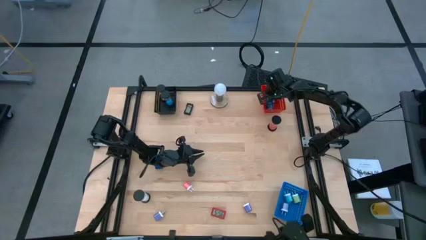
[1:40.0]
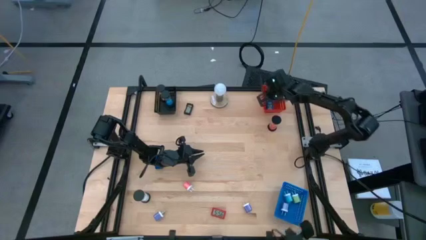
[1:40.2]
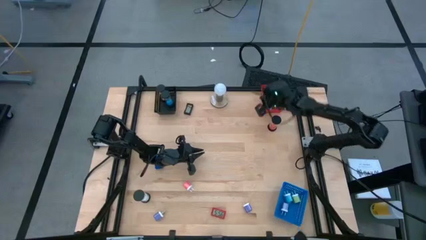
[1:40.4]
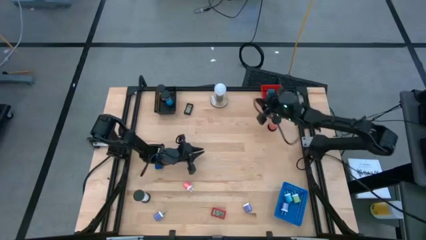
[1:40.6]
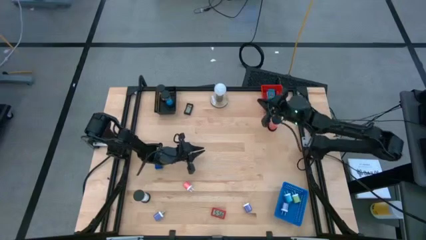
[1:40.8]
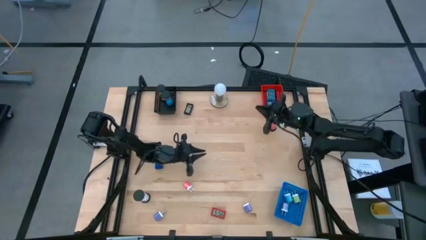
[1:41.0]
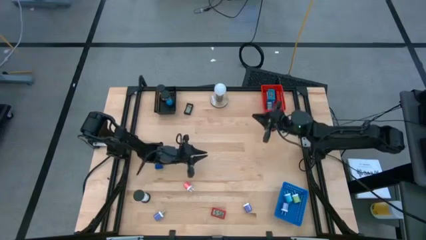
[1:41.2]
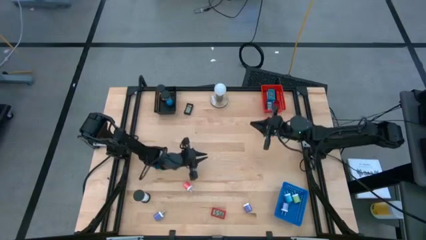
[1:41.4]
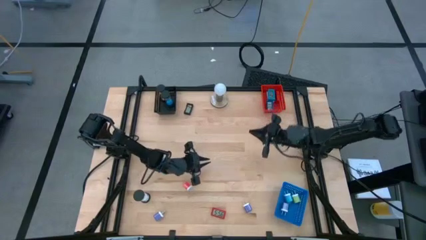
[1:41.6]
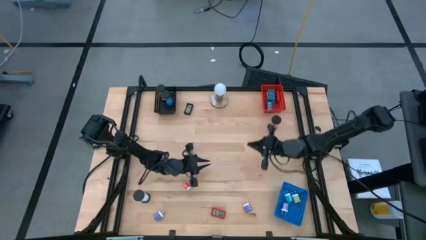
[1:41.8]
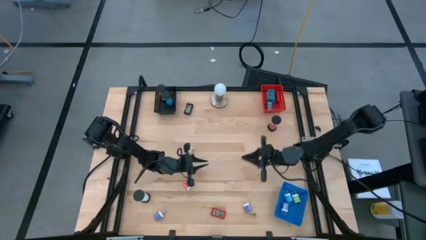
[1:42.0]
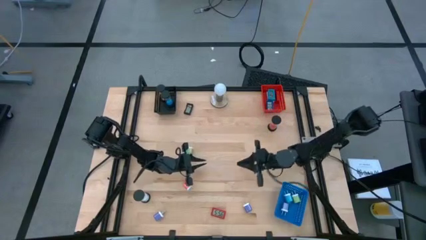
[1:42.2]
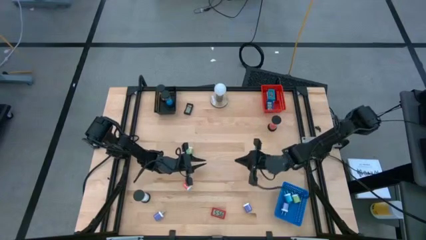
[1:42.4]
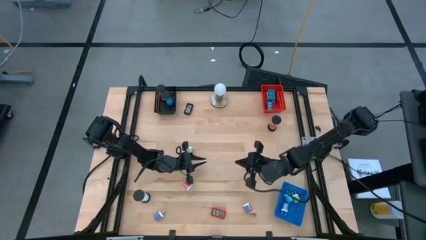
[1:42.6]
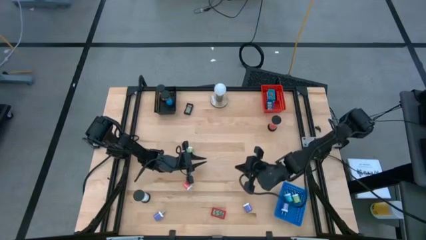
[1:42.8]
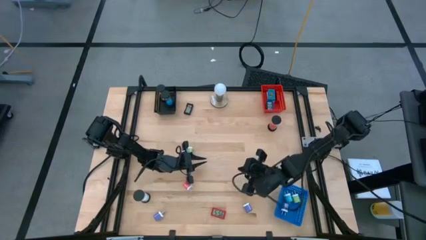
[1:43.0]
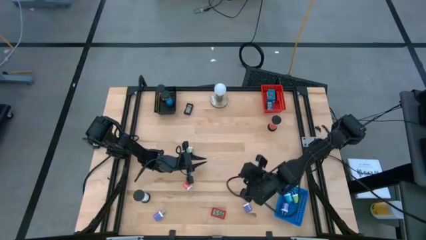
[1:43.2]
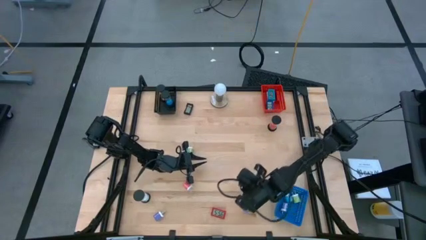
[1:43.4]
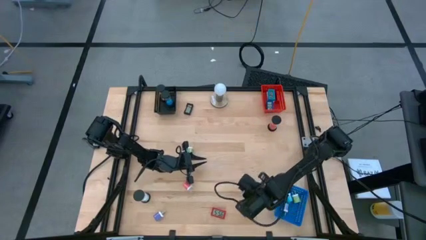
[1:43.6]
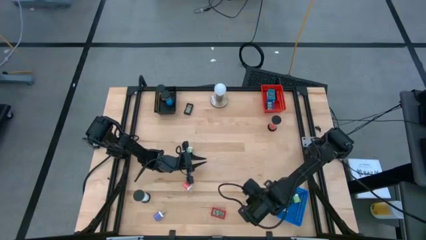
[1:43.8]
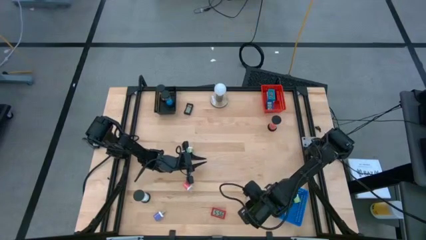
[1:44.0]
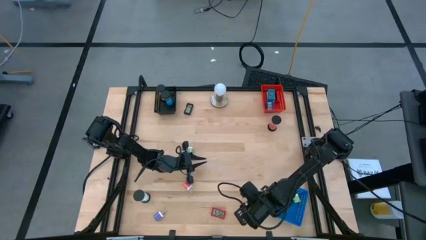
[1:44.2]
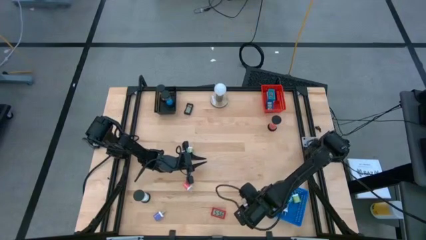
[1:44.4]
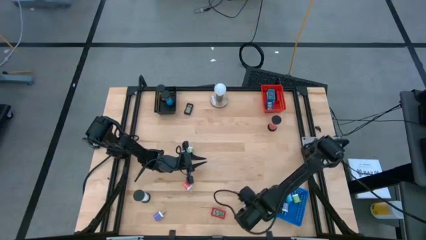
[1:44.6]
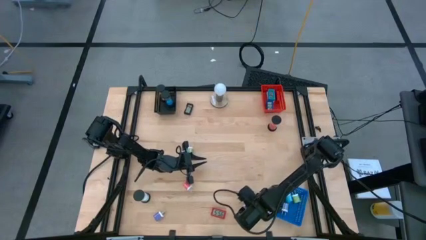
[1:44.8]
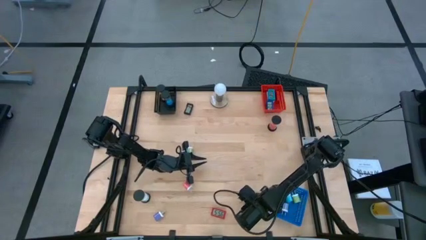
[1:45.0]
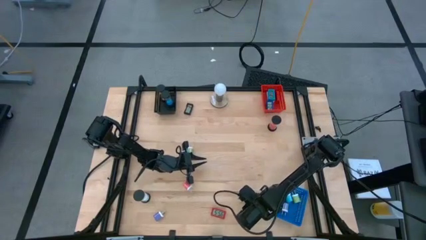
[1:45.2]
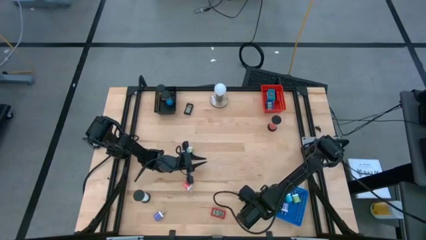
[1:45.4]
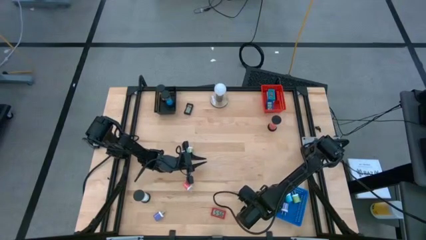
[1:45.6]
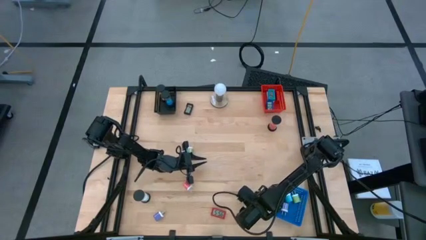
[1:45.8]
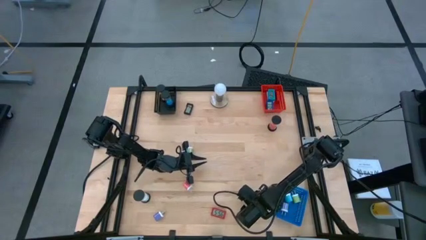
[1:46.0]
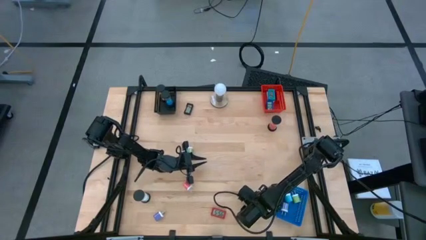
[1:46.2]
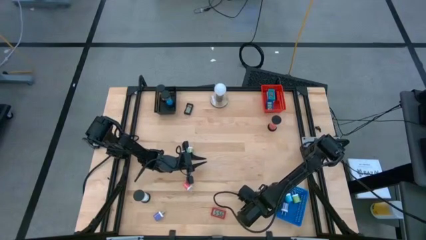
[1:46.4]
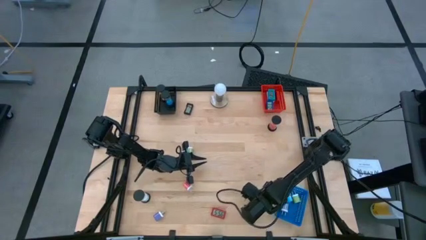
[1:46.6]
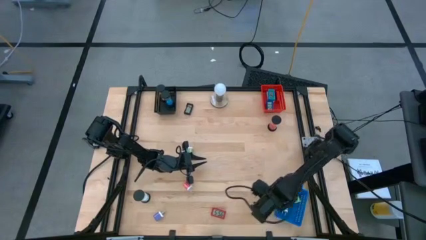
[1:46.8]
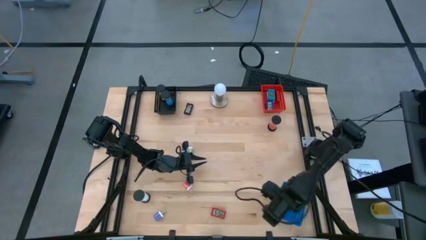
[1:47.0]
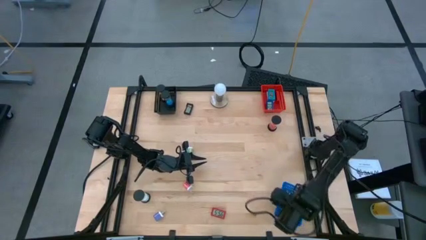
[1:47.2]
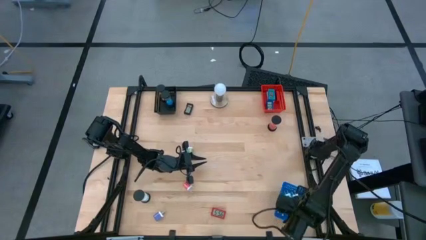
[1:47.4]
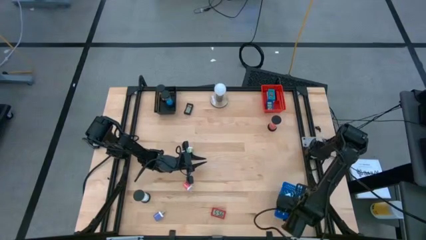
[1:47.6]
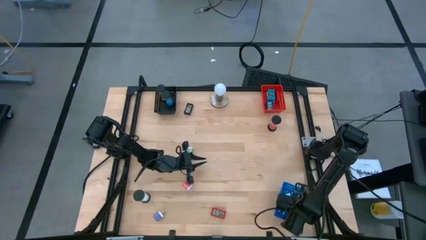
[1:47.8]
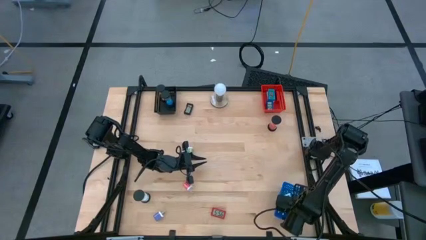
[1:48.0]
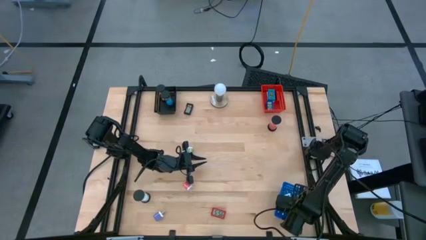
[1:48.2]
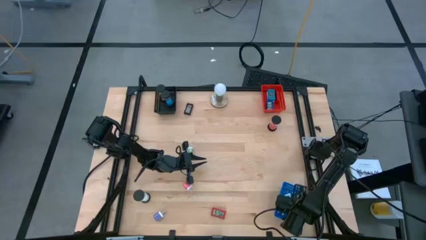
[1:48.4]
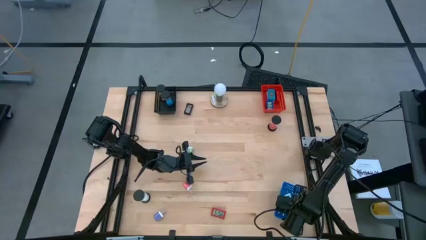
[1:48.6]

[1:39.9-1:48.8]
Task: Pick & Place Office items
Put the right violet charger adapter into the blue bin

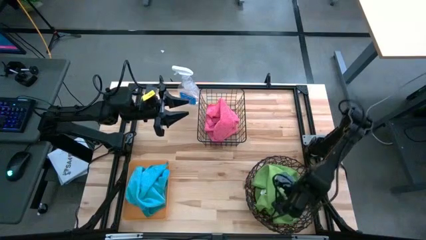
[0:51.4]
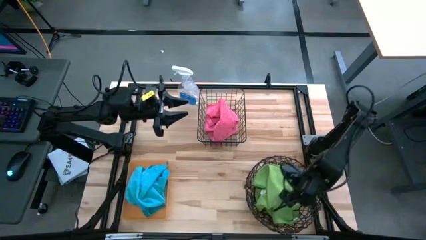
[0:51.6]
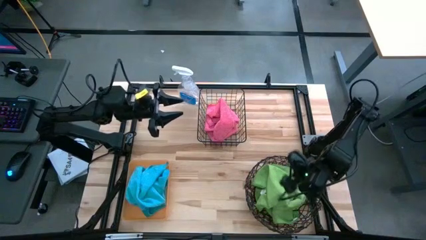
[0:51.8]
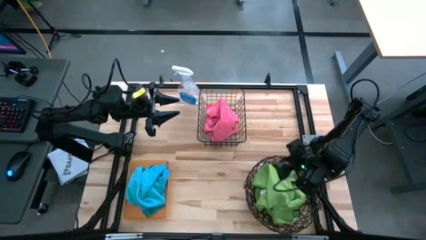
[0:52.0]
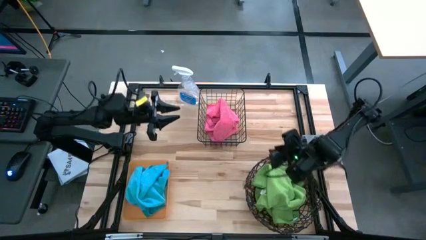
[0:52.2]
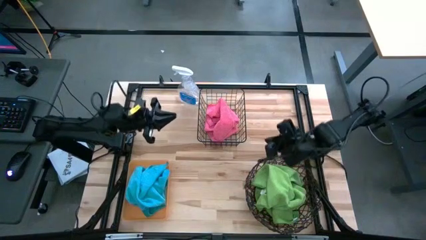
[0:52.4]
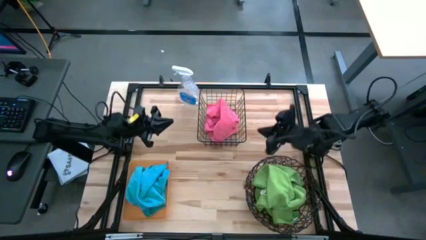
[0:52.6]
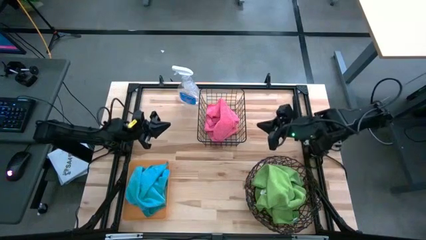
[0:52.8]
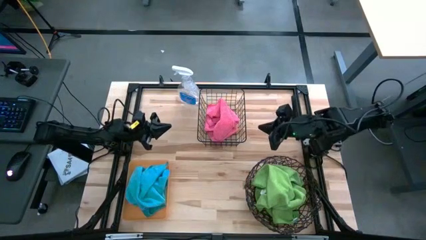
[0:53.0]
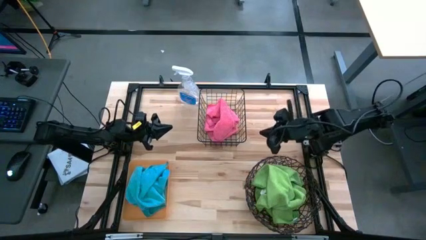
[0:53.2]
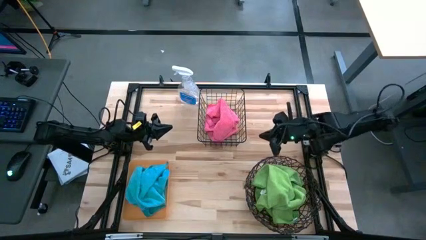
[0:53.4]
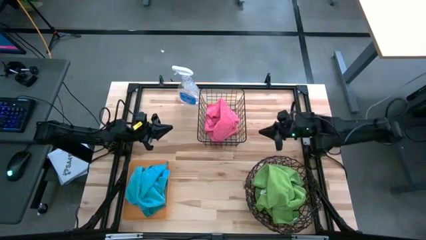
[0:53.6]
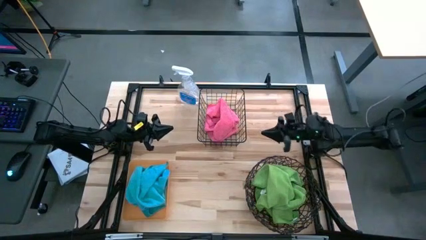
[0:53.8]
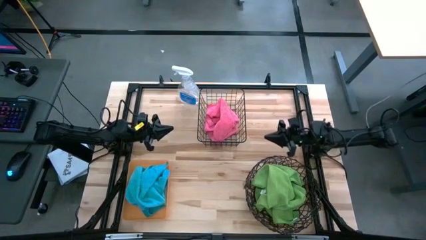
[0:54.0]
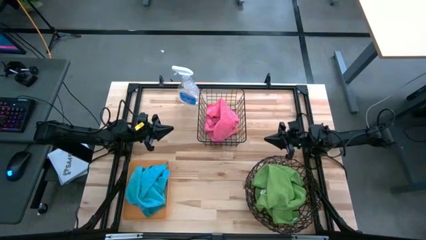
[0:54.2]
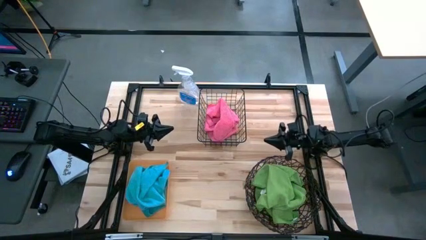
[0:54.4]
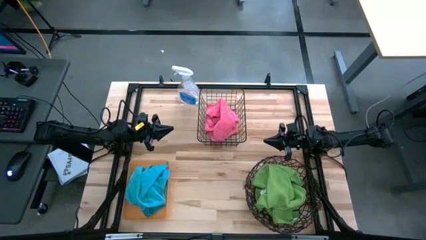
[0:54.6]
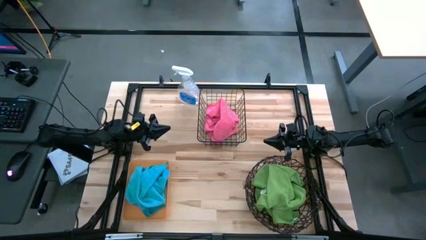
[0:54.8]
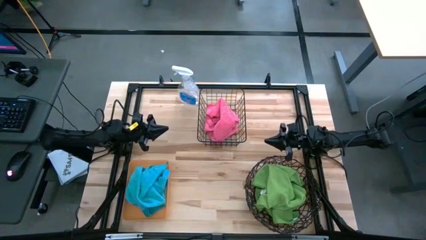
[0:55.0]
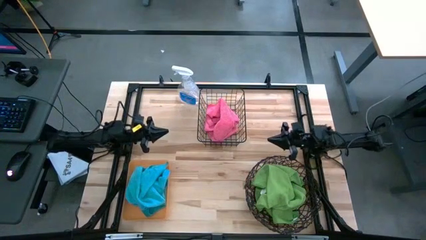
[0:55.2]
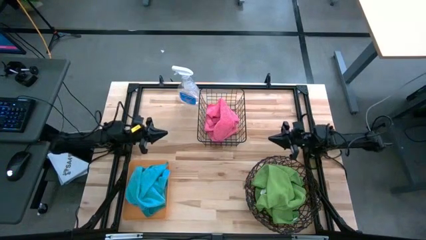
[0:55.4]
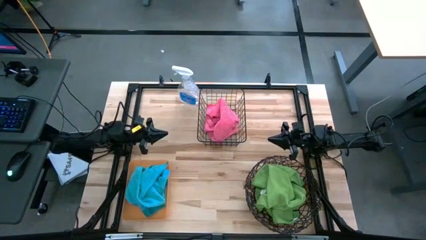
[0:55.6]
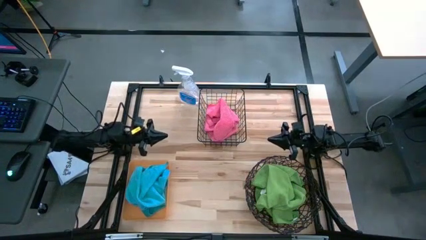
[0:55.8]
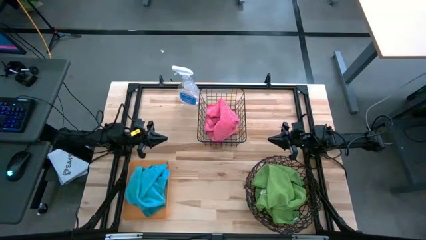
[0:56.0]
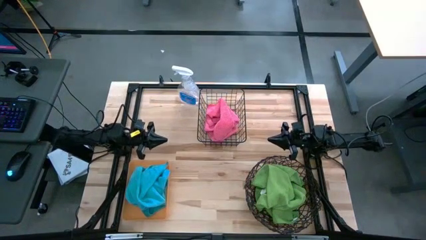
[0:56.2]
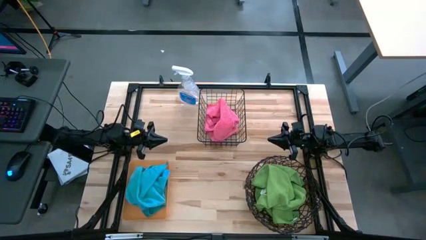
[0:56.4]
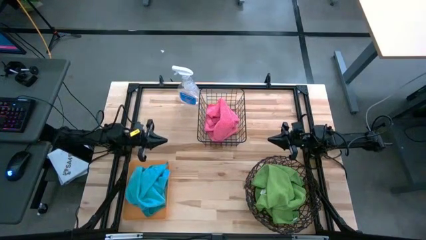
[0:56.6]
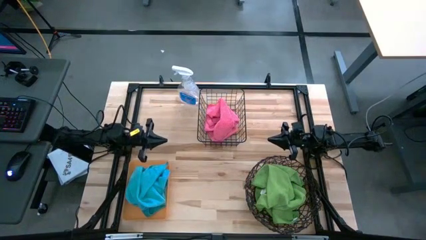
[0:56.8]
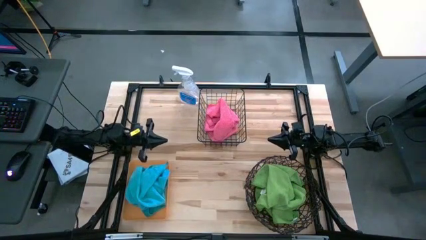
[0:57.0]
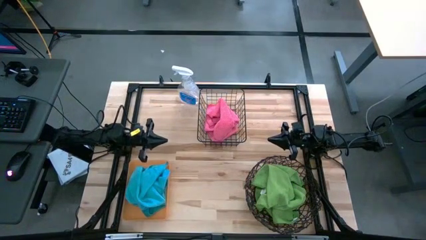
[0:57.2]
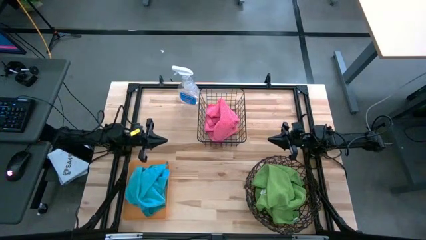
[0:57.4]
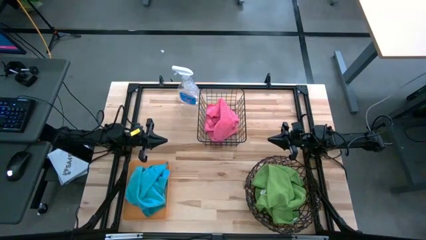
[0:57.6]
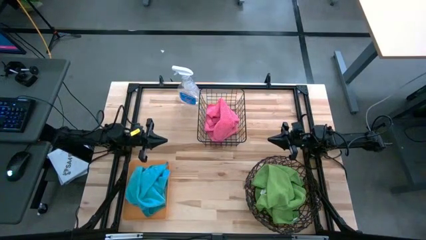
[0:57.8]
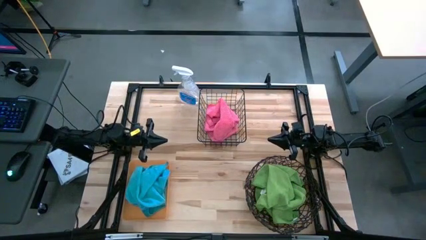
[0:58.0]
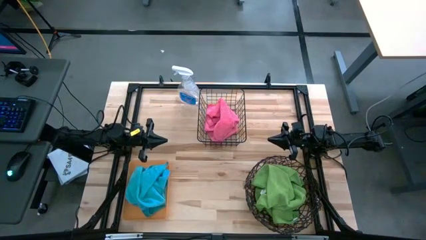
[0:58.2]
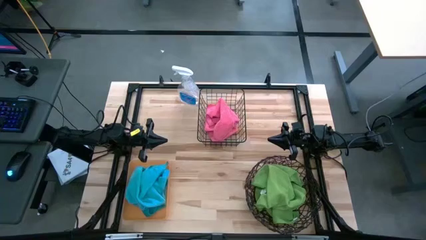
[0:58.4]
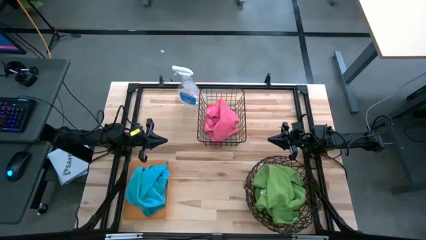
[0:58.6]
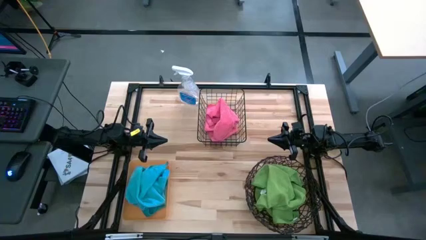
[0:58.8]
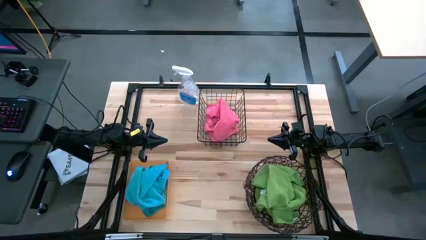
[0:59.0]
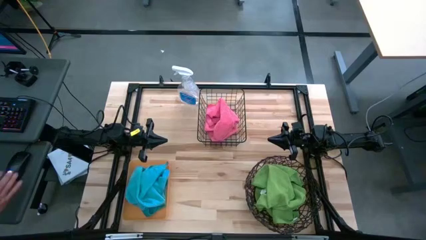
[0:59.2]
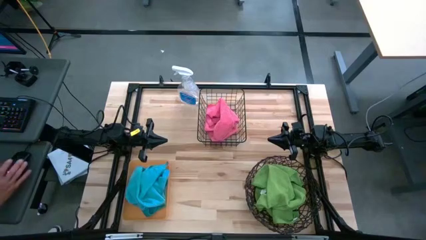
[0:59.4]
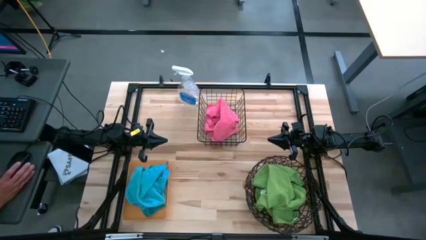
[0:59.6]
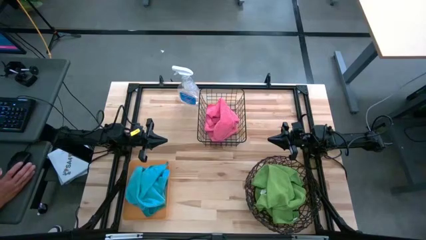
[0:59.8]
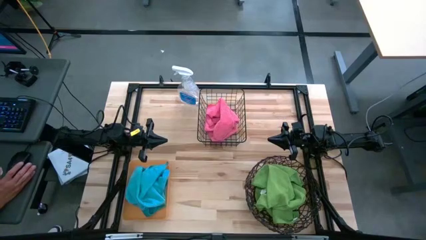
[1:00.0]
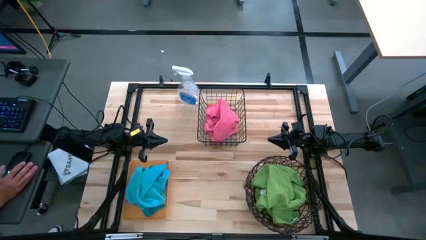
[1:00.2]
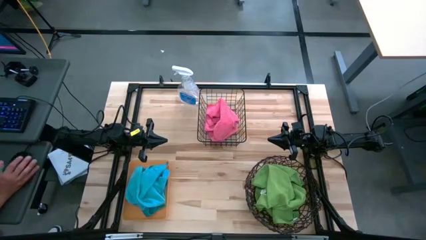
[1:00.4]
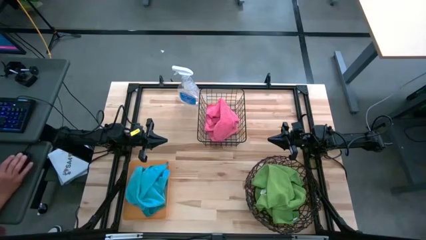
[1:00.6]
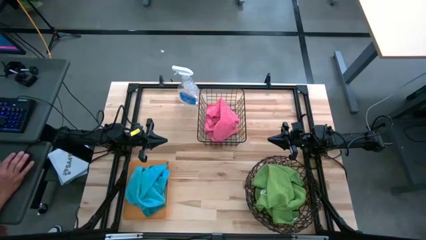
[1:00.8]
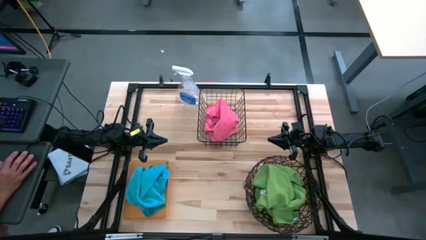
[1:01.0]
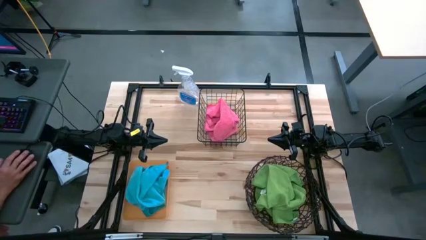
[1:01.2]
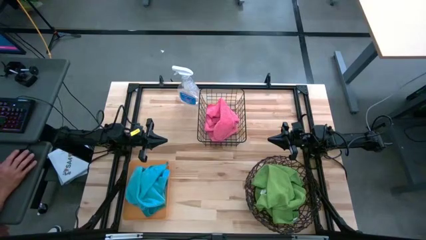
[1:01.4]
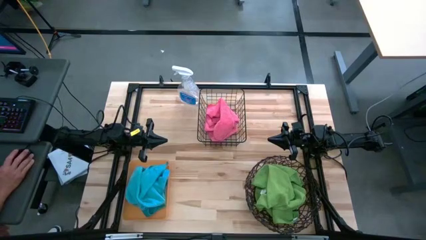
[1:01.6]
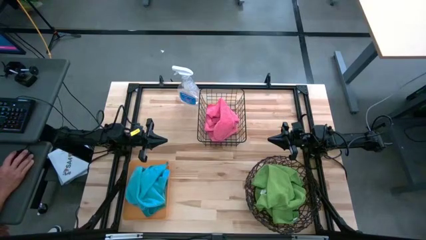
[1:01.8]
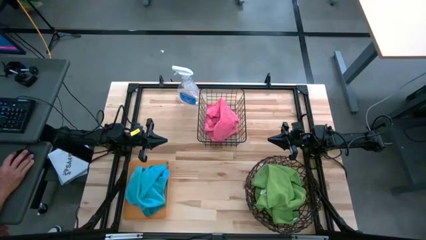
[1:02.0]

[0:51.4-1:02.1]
Task: Sort microfiber towel by color & place in baskets
Return to Home Position
